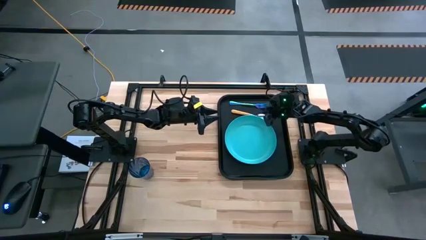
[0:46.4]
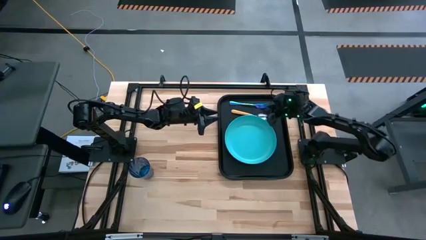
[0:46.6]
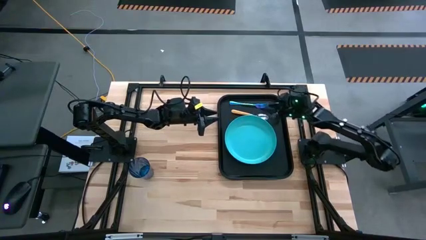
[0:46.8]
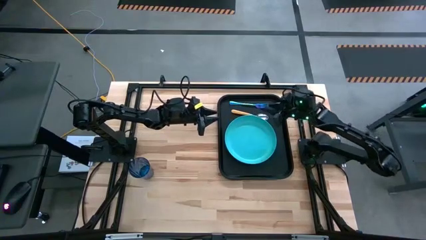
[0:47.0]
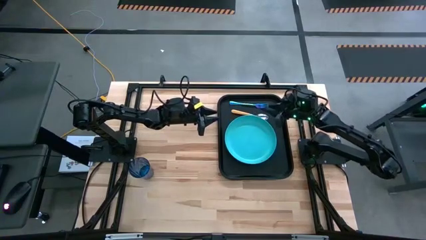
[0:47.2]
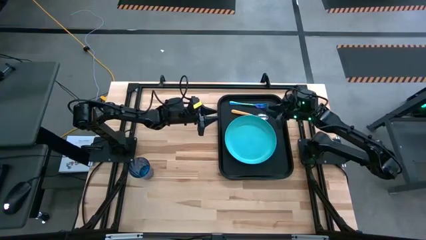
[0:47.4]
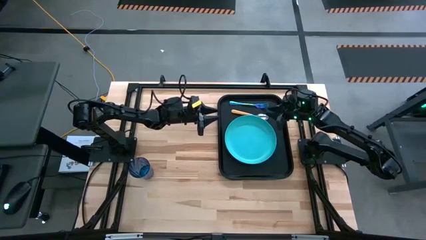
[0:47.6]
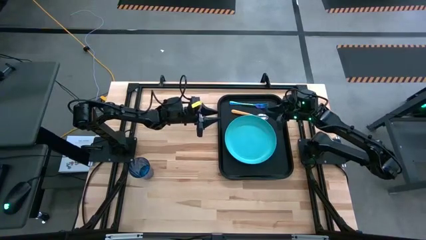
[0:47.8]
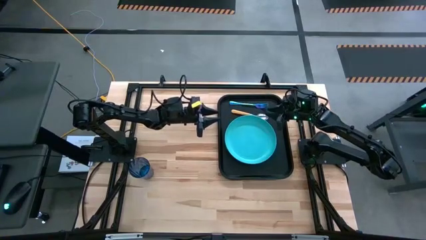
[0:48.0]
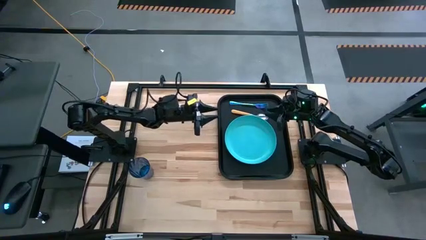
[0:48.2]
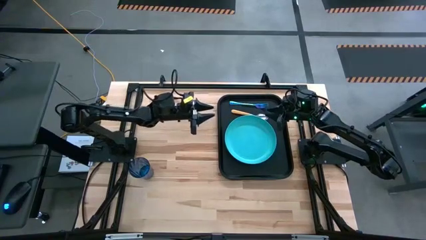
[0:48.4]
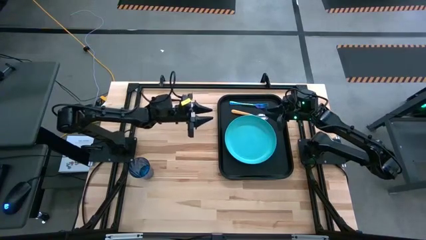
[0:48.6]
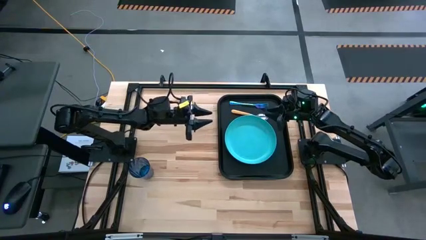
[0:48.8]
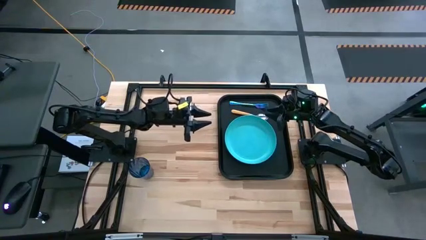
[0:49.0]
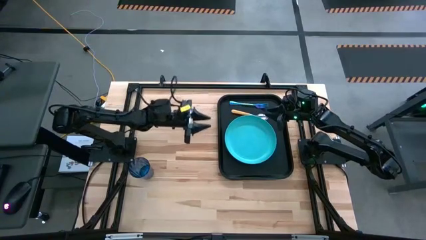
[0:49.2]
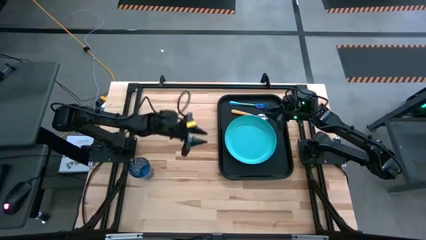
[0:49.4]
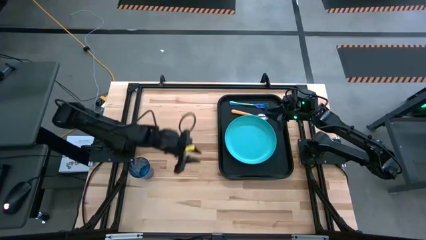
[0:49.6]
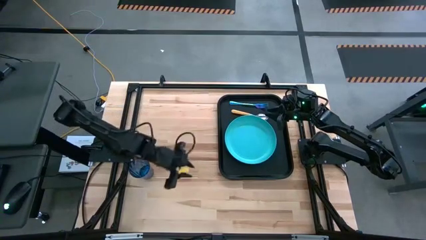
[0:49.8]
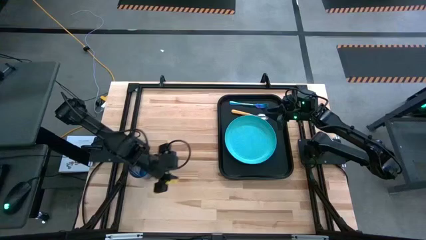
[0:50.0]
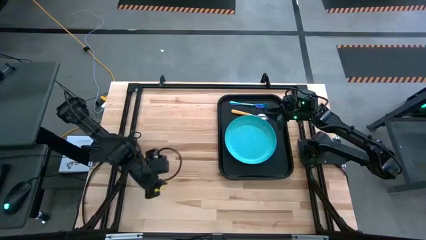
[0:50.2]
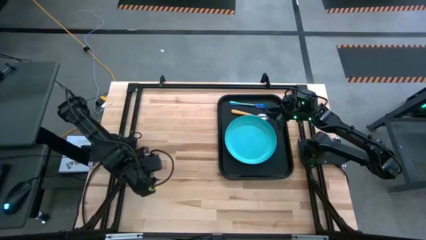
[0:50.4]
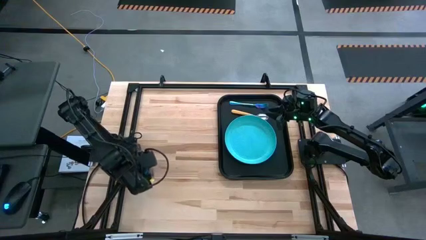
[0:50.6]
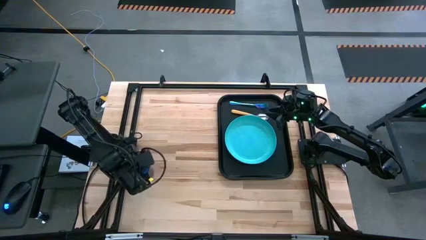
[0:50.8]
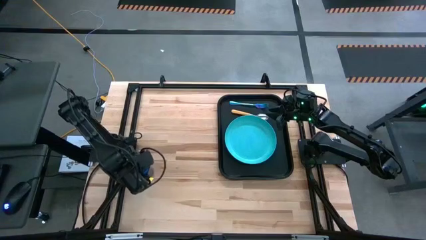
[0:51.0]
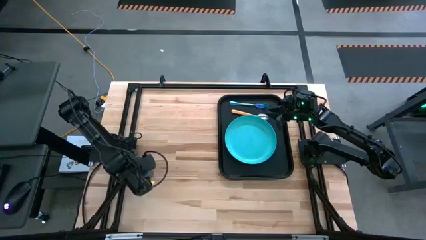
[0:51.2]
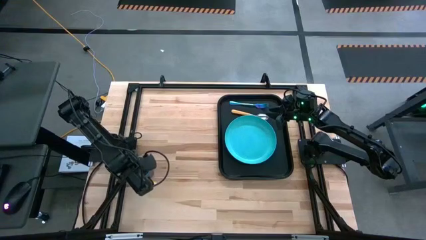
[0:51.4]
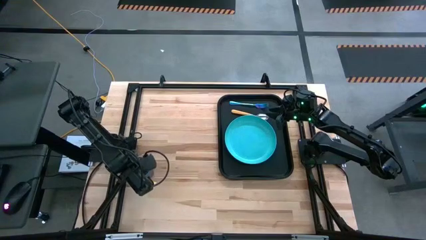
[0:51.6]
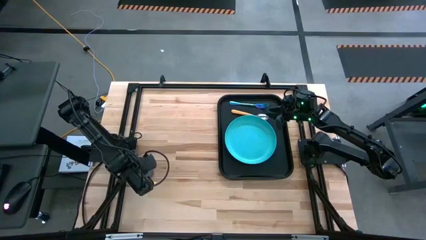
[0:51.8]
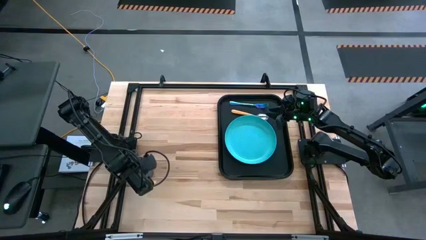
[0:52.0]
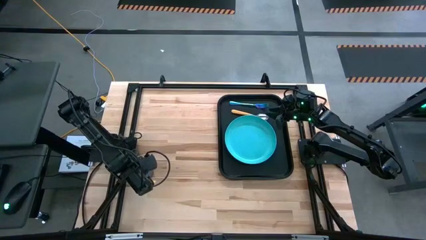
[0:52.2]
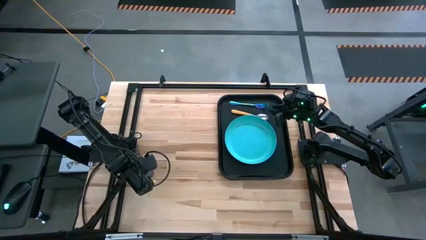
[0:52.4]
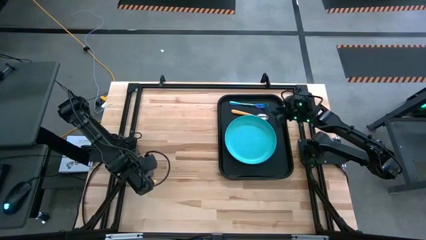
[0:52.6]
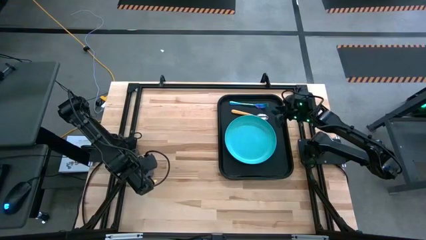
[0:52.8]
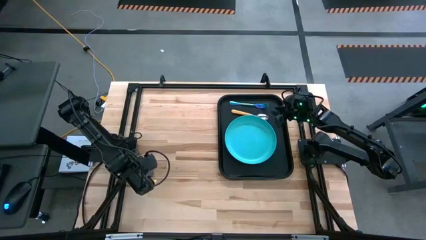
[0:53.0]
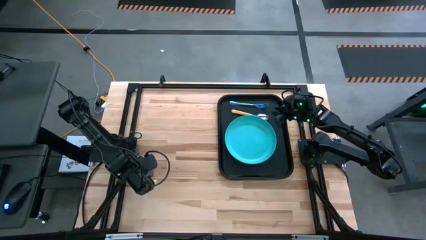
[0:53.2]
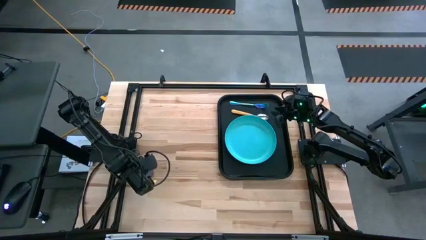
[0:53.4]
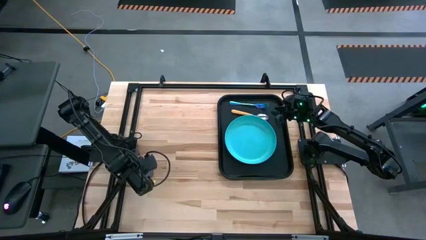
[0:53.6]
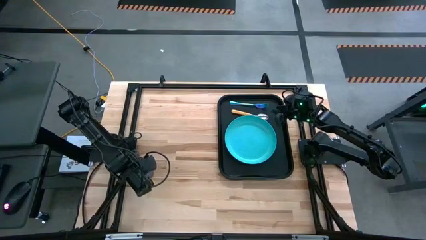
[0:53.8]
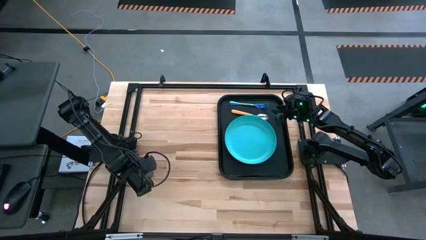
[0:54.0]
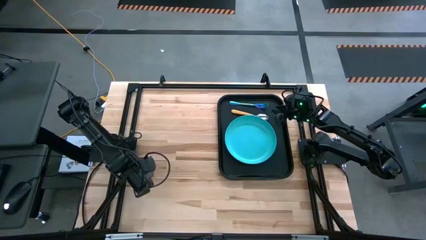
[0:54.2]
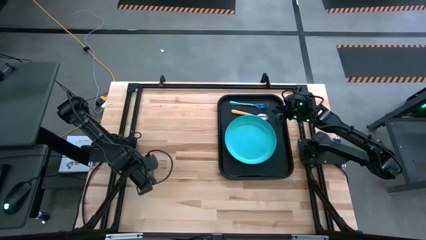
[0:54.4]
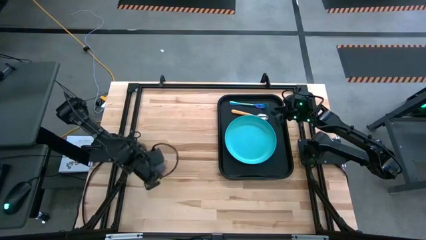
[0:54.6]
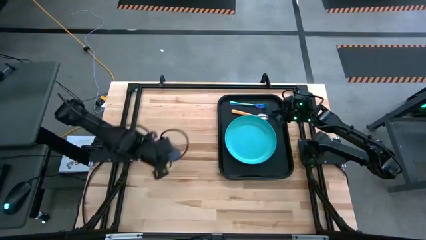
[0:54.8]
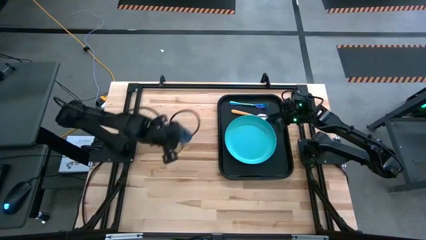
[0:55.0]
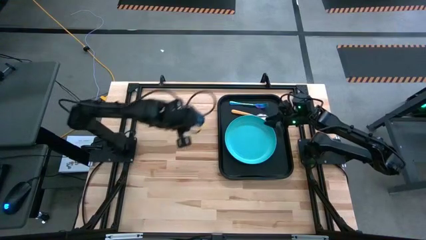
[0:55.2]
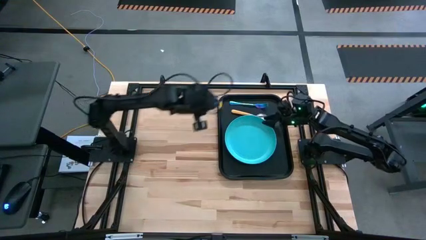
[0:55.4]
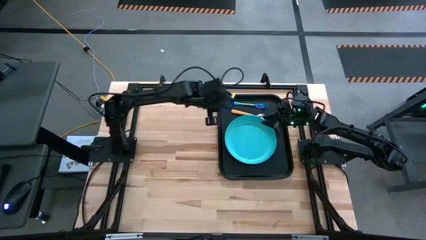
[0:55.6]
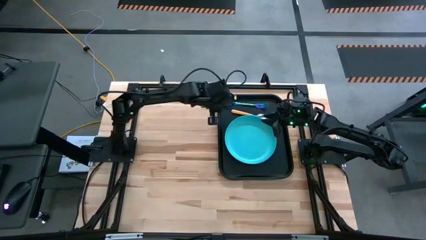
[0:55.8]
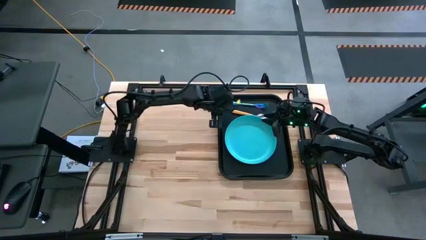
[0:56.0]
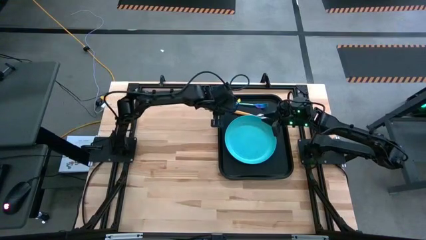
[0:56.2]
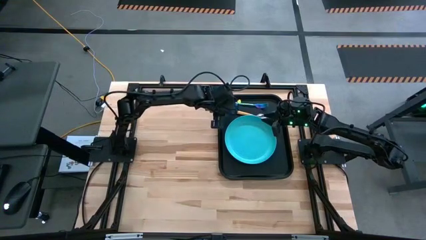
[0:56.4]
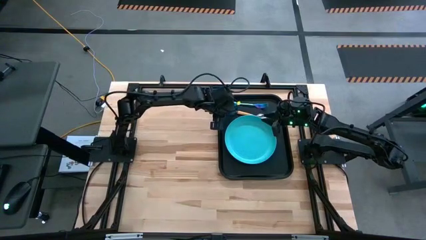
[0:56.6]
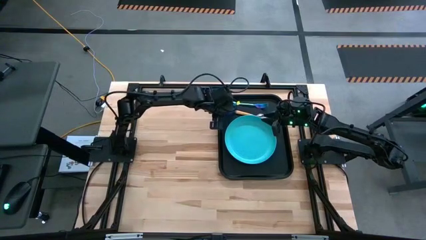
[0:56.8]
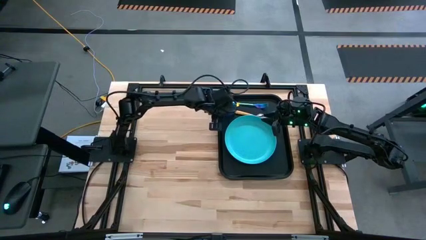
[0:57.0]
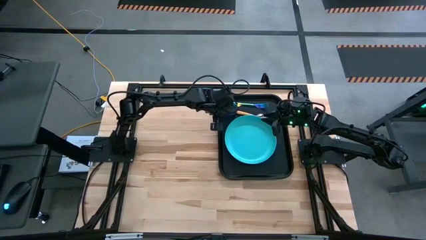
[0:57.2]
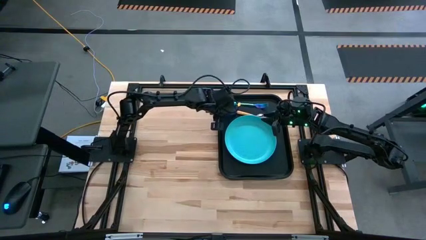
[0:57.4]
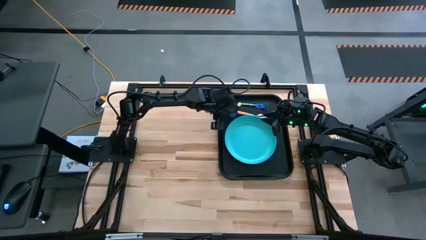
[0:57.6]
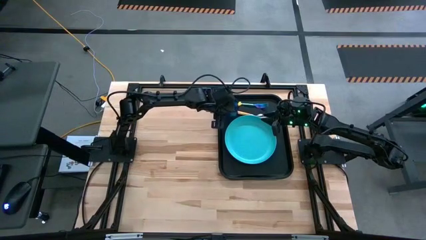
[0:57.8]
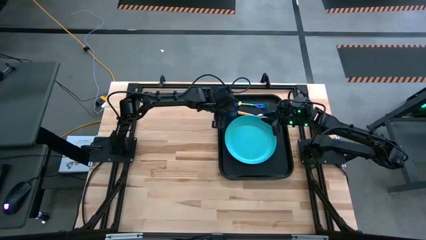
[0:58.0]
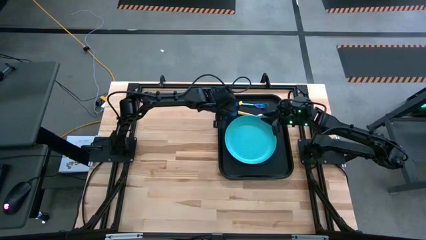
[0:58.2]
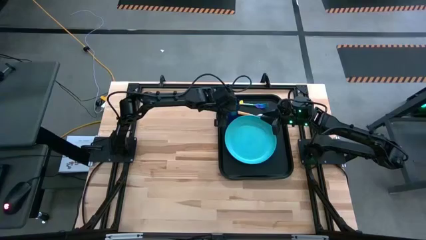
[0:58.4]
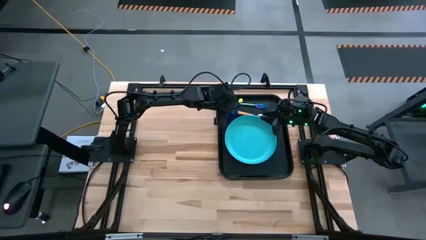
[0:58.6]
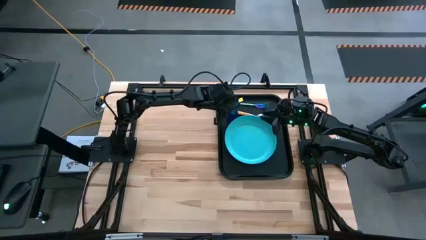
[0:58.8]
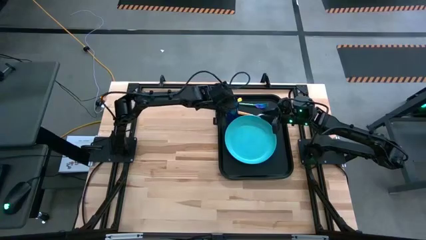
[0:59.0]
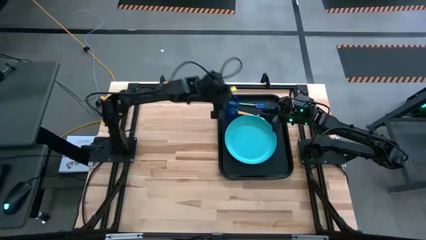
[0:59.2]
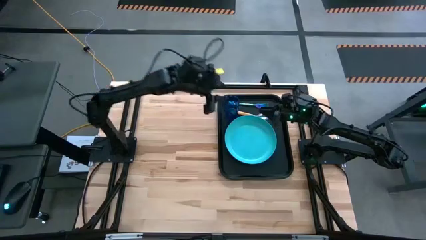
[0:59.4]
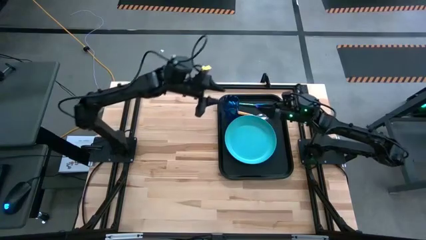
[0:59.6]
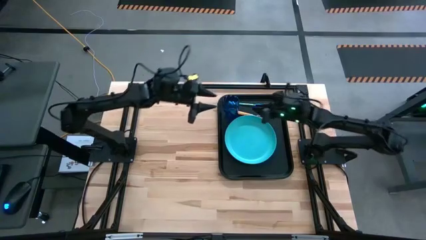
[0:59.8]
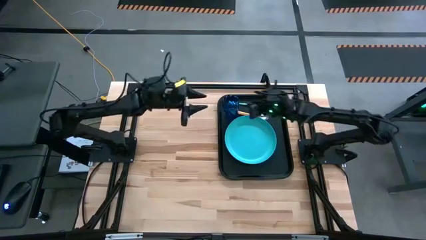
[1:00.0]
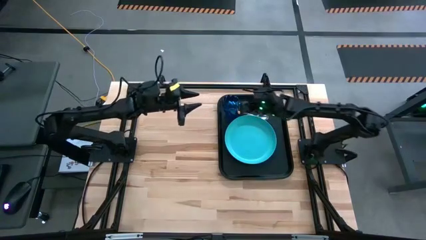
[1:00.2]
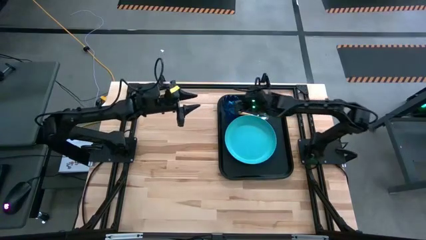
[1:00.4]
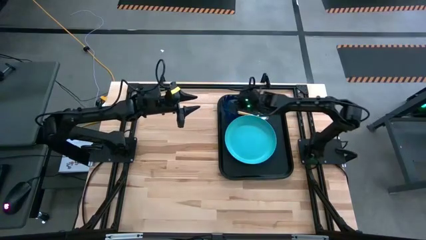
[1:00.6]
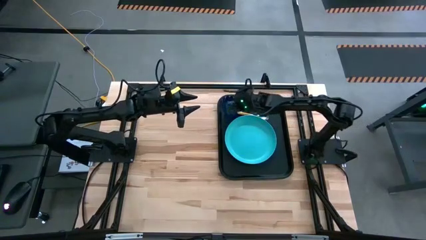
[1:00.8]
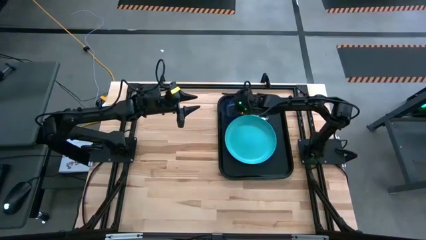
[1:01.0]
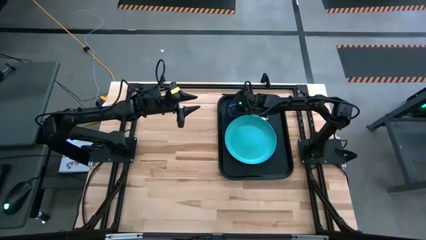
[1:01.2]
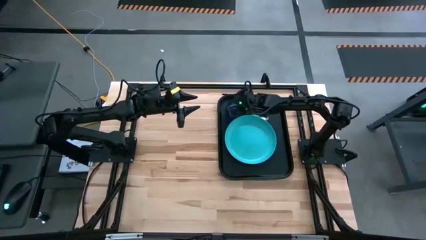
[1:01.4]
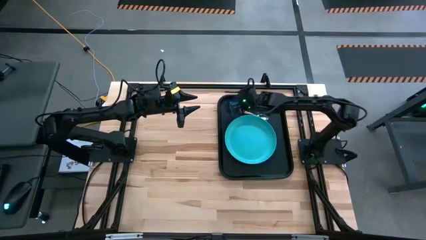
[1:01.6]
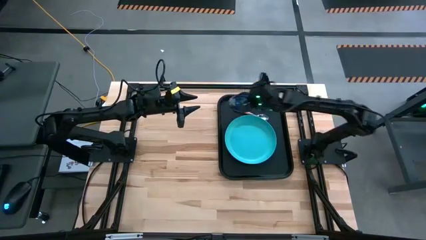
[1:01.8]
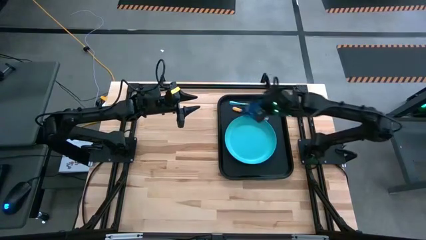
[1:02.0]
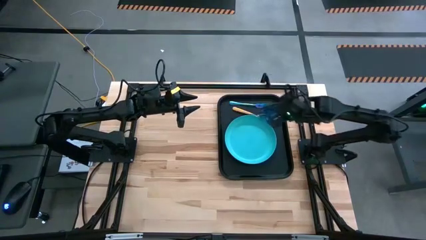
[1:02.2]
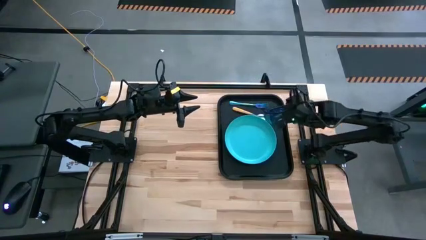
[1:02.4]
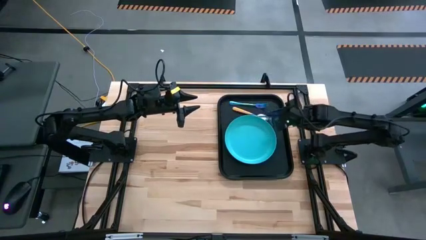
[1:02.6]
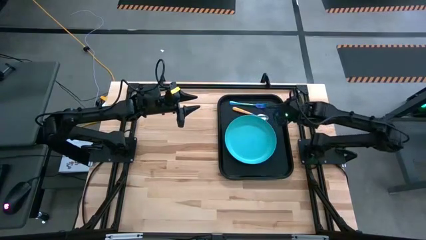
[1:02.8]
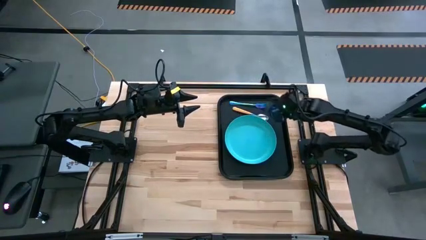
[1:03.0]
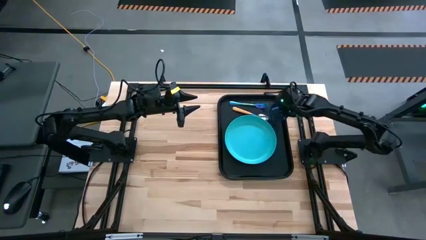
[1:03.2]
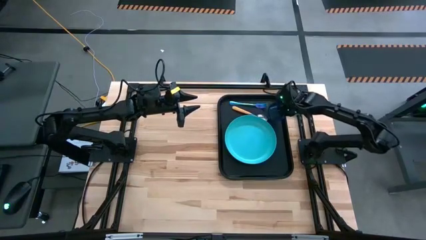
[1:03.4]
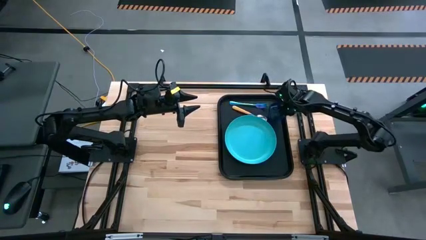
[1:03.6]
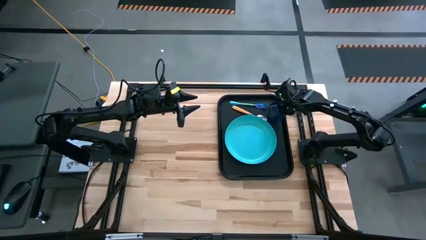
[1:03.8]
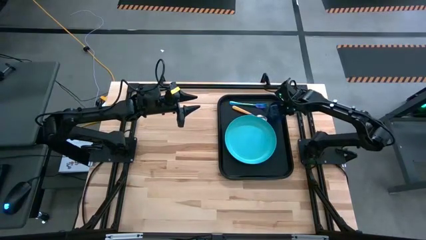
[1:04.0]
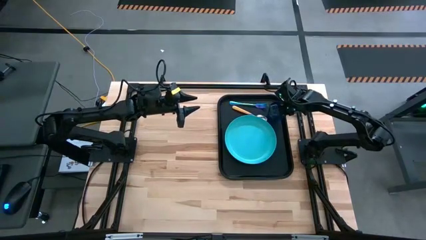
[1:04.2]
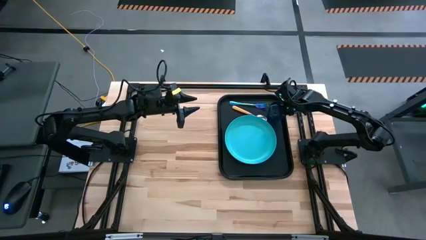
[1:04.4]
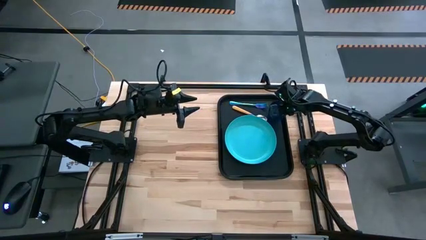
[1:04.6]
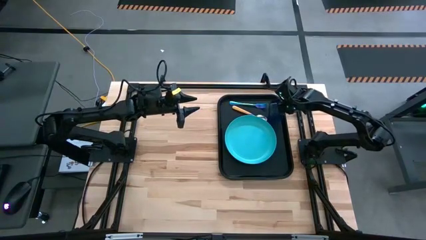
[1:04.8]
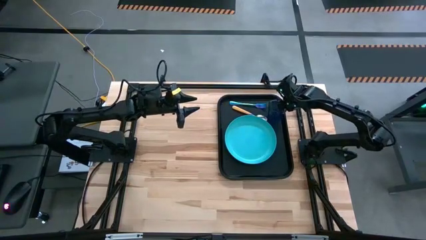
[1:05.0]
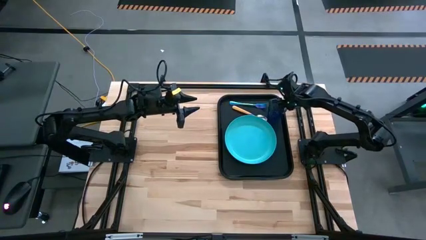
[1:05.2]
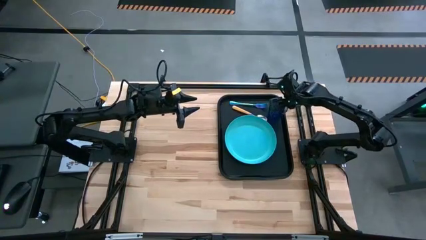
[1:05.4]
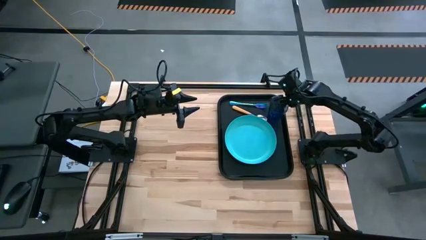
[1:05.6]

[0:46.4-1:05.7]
Task: Pick and place plate/cup/fork/spoon on tray
Put the blue cup on the black serving tray to the top left of the yellow spoon
